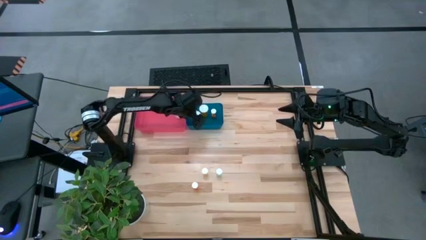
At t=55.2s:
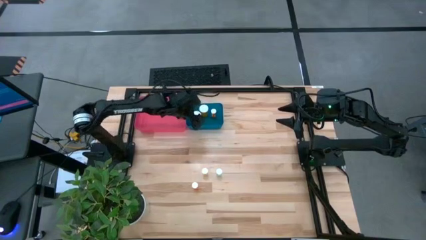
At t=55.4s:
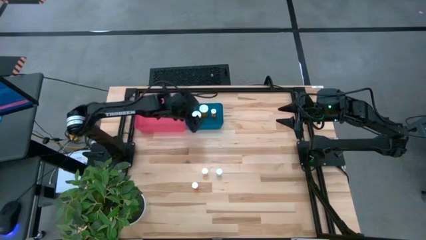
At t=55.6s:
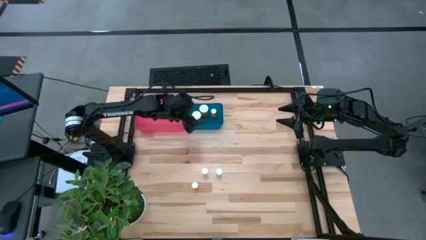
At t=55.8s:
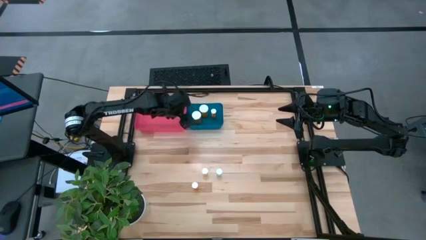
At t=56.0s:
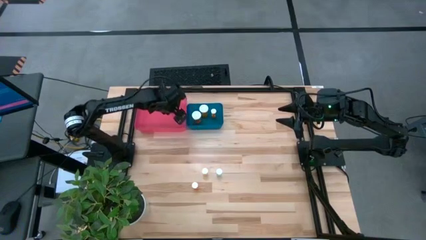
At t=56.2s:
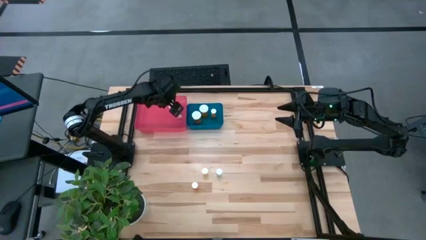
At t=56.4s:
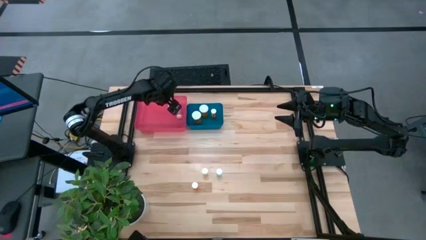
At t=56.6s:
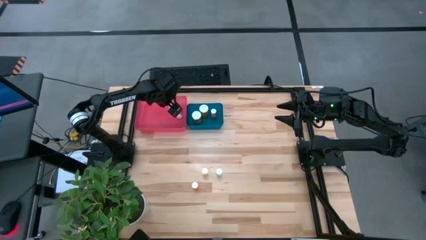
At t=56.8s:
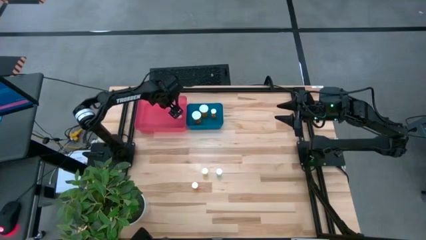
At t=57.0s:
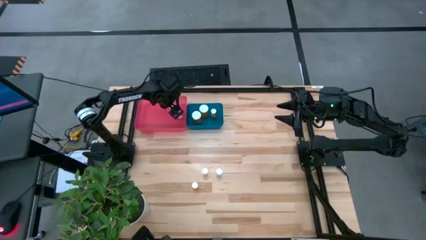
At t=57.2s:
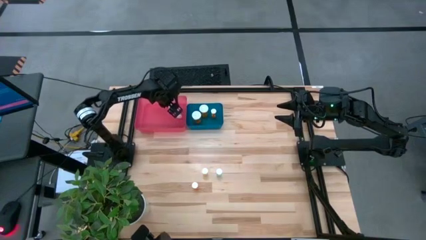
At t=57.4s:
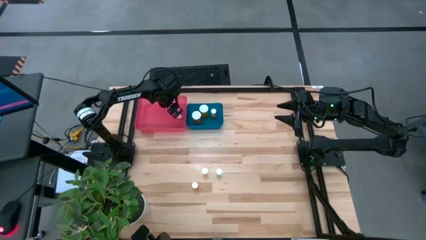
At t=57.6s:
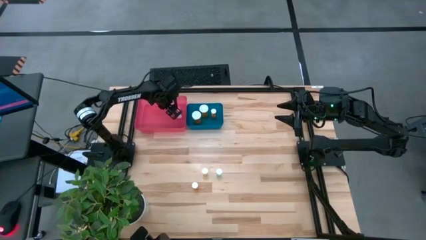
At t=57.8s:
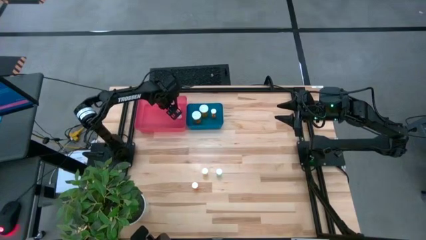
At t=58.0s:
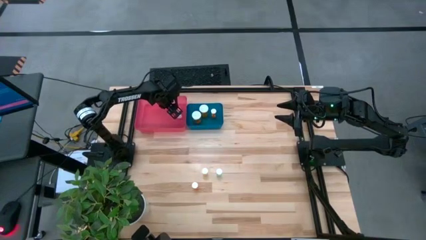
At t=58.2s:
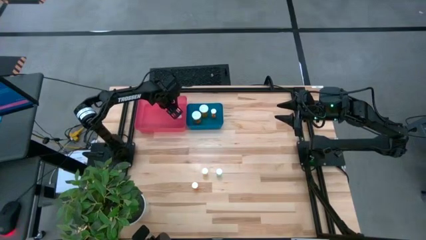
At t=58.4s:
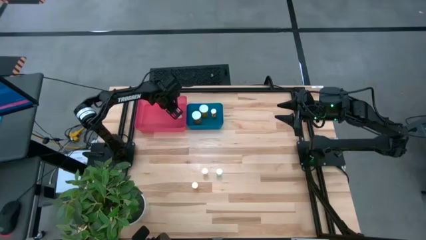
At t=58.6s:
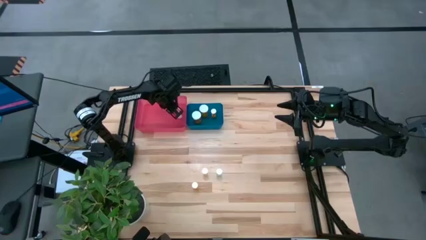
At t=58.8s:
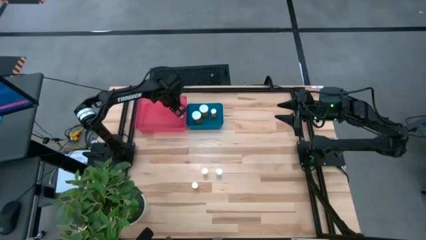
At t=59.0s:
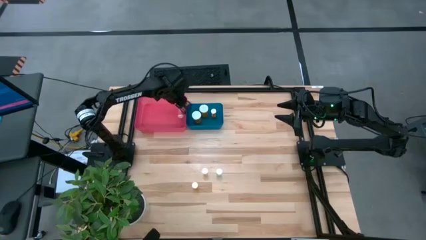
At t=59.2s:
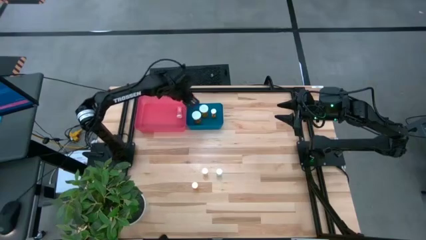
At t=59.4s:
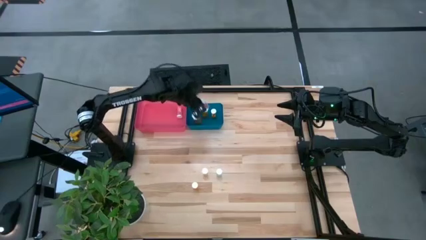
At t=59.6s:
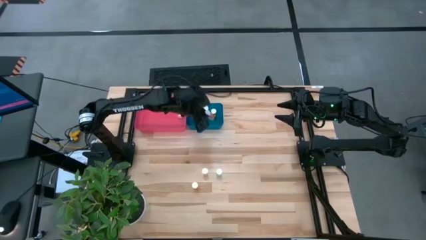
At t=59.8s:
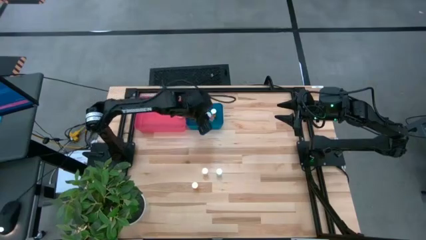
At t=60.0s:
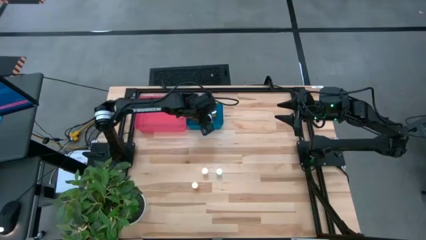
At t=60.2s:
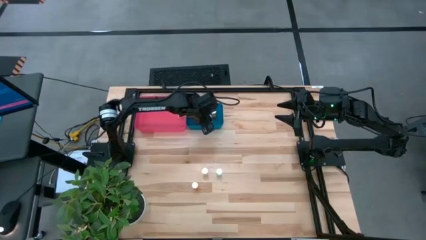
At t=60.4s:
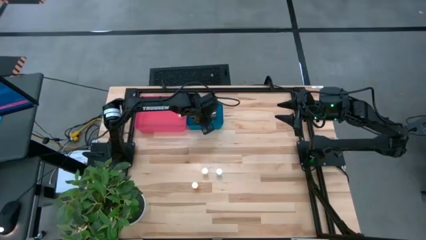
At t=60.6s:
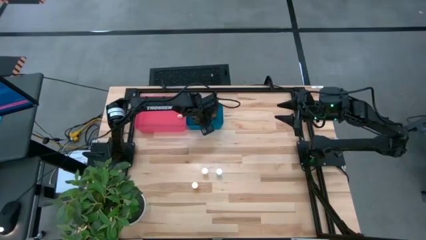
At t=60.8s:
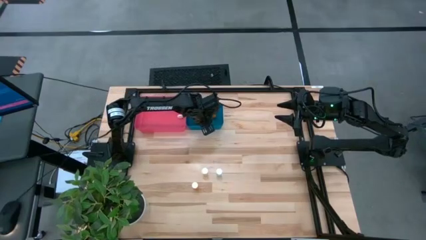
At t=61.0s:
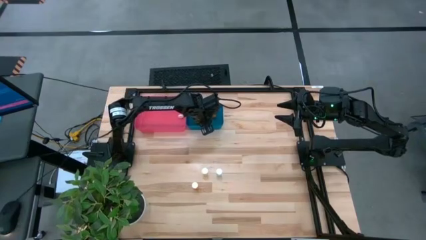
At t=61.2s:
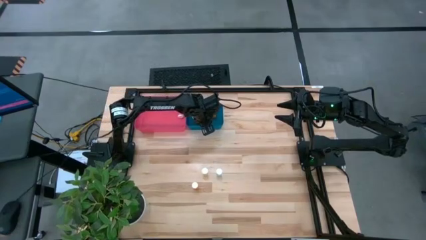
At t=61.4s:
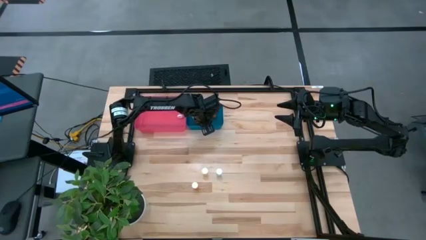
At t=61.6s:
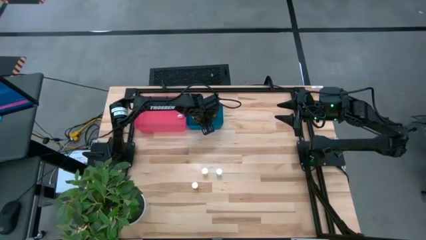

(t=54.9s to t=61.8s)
Task: Pick and place medicine bottles into bin by pill shape (circle, oval)
Put the blue capsule bottle from the pink bin into the blue bin

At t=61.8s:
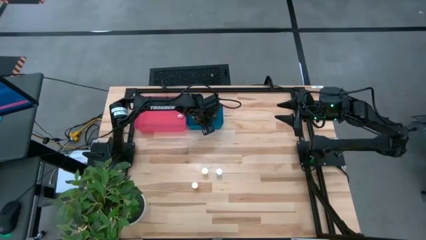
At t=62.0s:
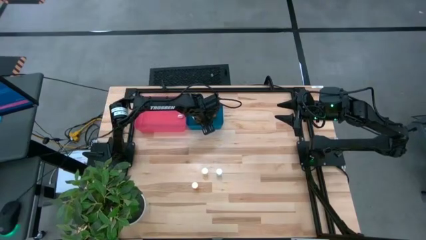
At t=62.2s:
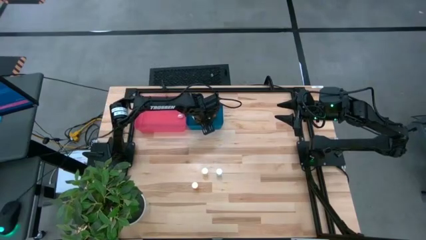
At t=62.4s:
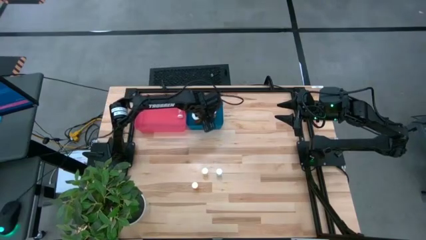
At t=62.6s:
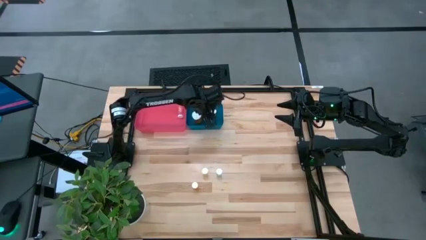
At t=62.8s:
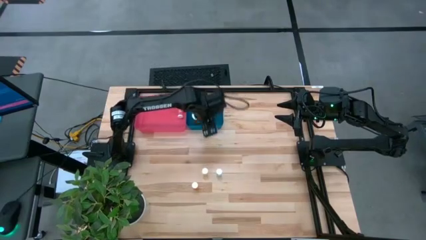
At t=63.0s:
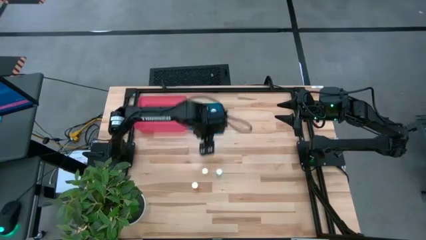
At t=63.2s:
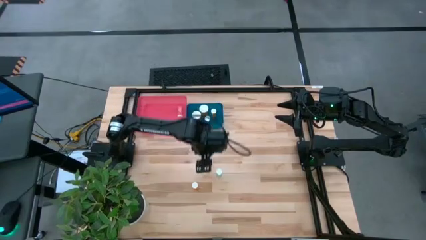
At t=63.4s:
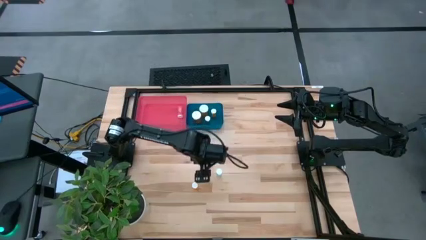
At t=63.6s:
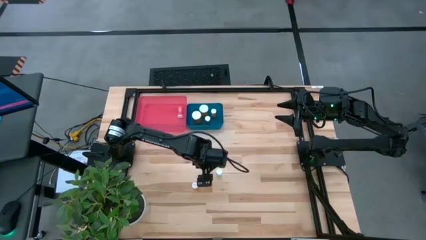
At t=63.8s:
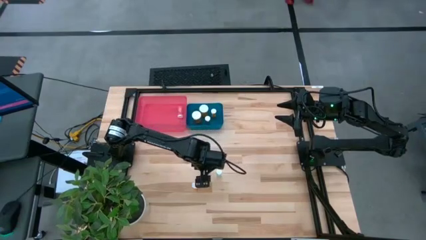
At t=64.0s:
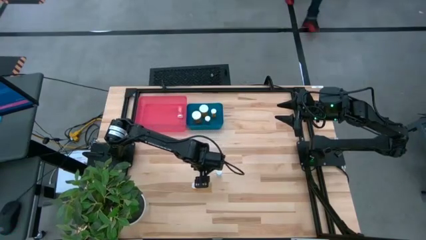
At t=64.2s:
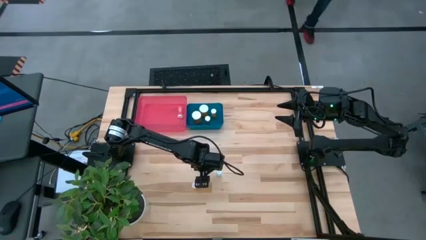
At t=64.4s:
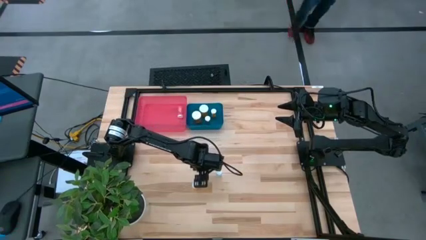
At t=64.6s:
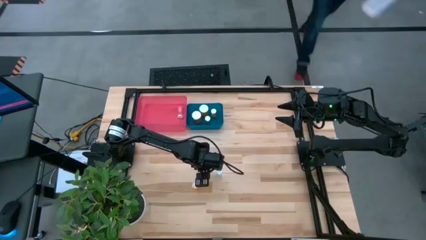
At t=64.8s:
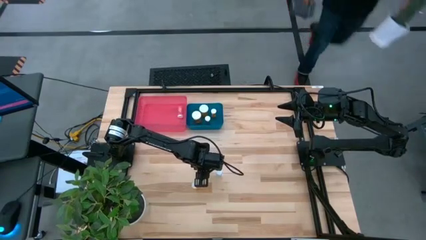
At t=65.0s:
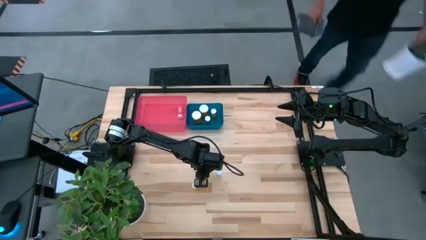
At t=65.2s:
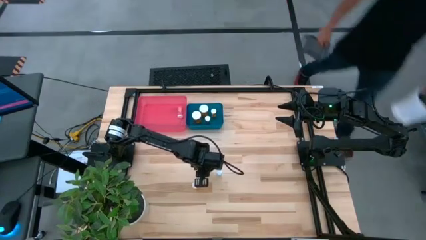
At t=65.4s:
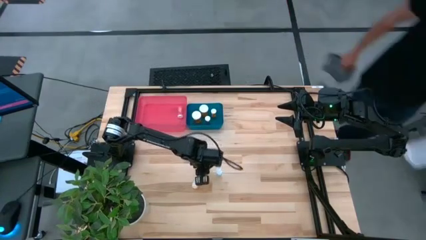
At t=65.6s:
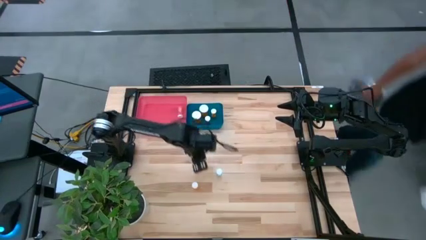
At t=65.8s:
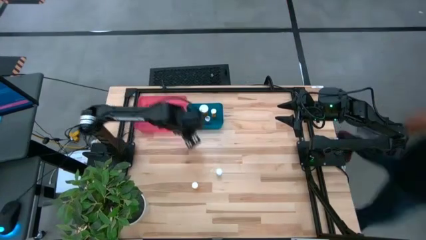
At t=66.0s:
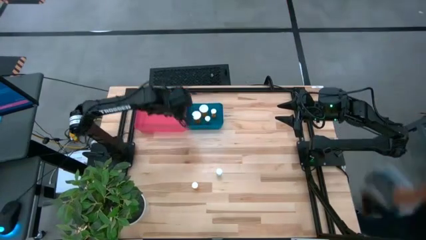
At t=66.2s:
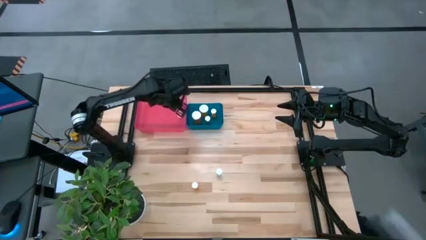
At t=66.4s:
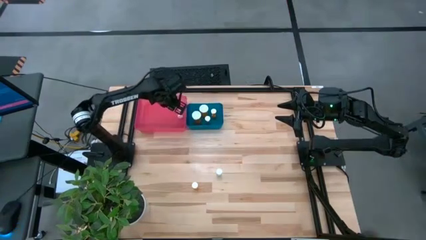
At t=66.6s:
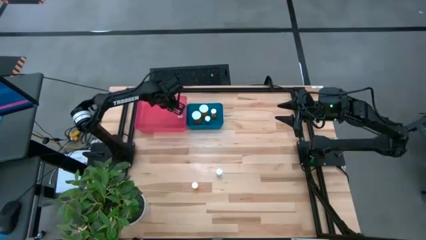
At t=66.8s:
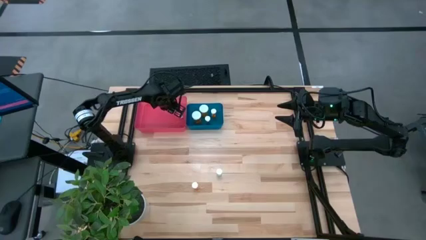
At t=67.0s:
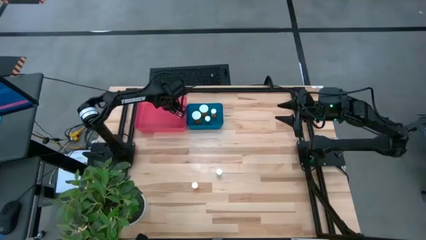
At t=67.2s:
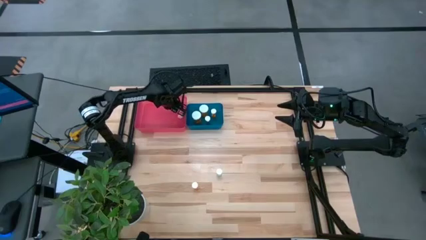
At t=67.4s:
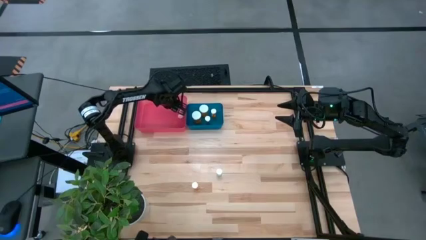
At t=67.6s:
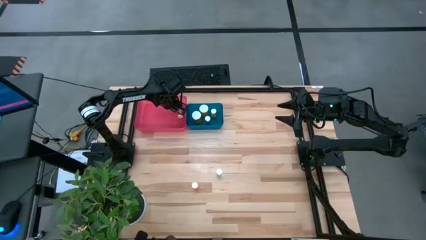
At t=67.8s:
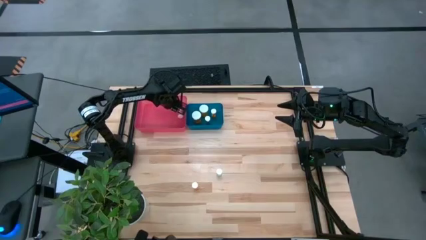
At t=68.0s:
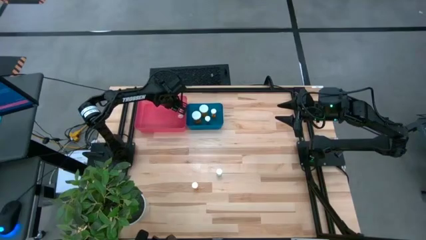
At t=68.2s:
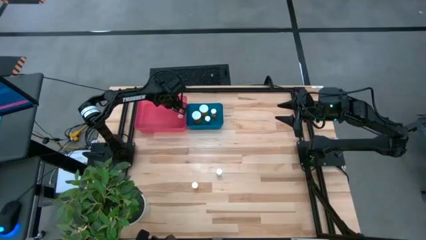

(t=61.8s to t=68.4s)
Put the yellow tablet bottle into the pink bin

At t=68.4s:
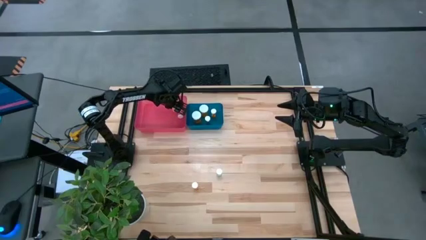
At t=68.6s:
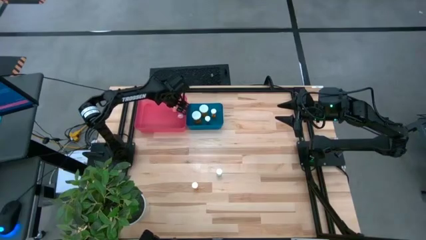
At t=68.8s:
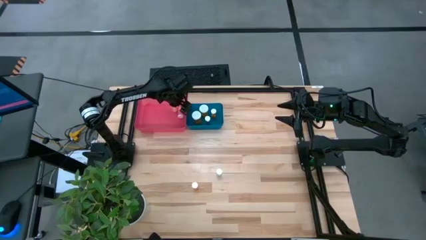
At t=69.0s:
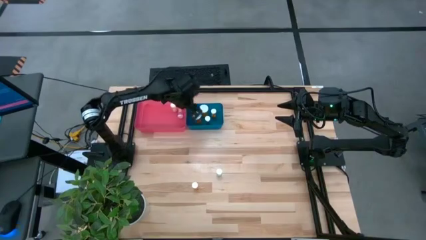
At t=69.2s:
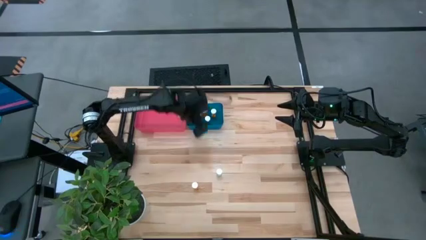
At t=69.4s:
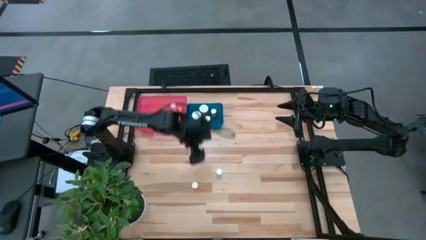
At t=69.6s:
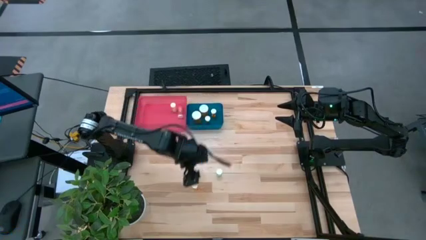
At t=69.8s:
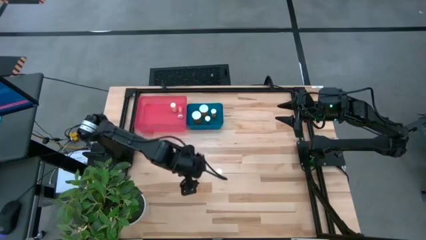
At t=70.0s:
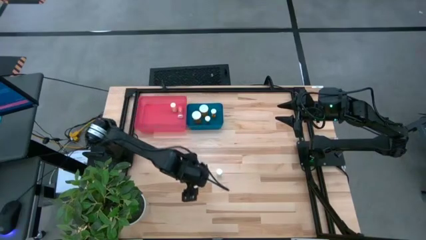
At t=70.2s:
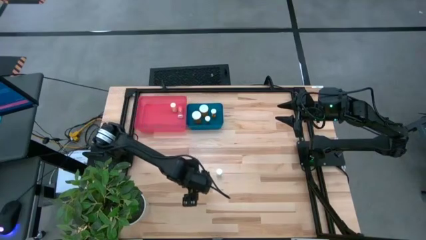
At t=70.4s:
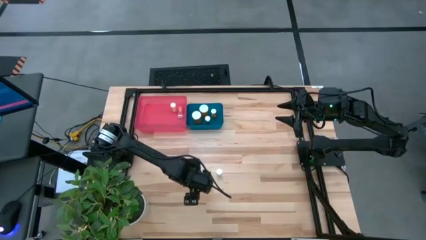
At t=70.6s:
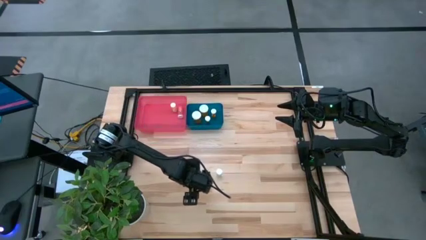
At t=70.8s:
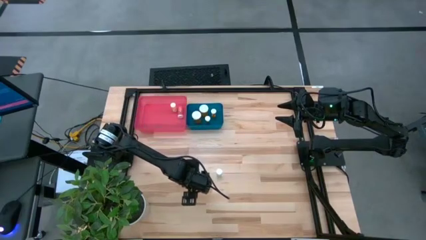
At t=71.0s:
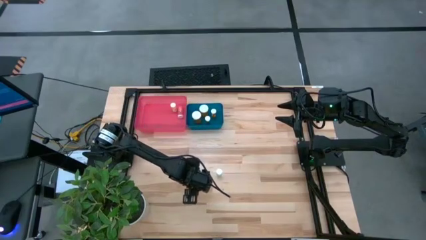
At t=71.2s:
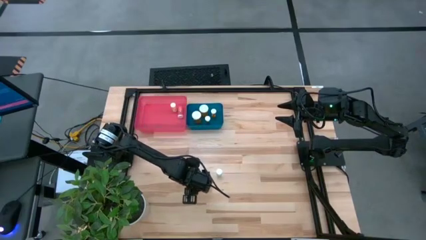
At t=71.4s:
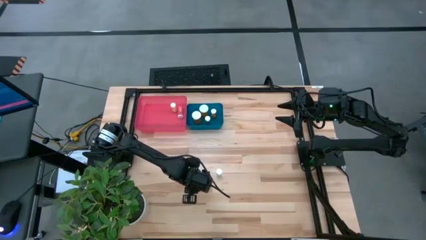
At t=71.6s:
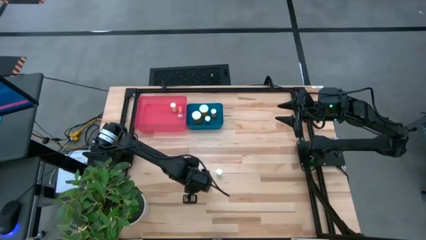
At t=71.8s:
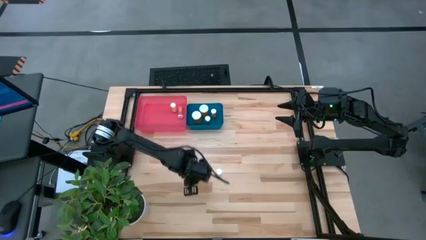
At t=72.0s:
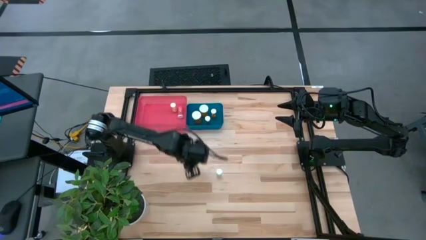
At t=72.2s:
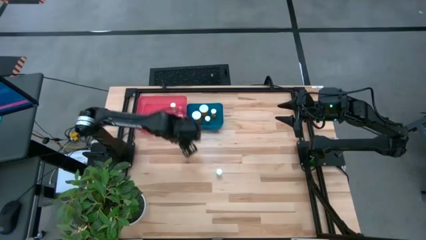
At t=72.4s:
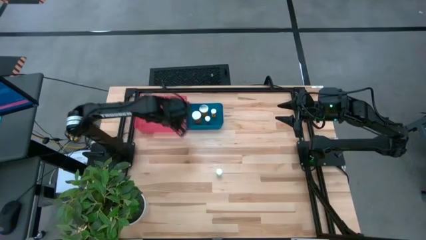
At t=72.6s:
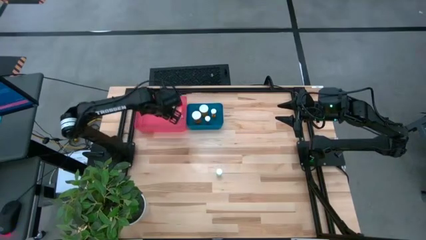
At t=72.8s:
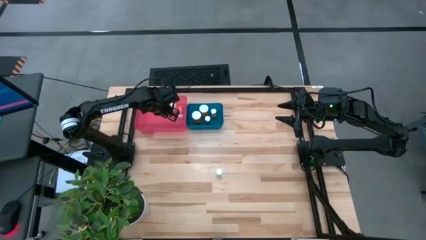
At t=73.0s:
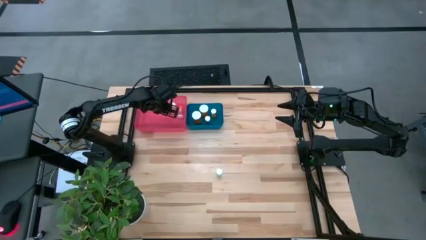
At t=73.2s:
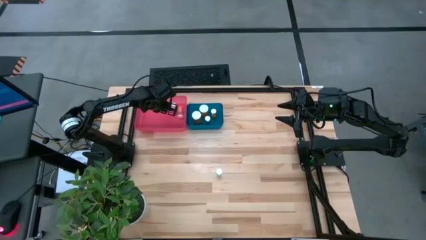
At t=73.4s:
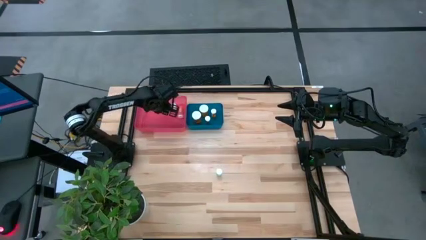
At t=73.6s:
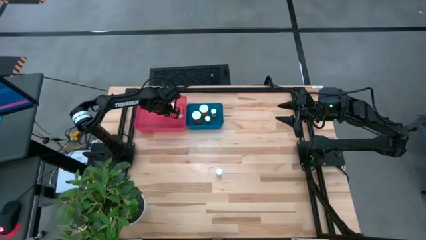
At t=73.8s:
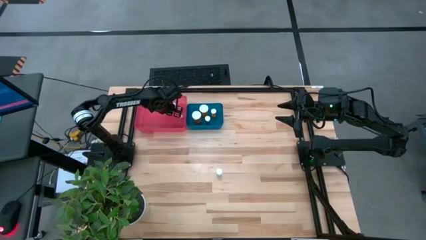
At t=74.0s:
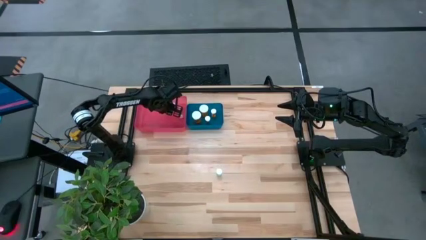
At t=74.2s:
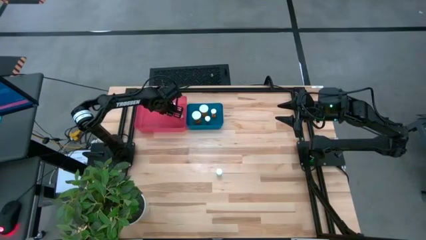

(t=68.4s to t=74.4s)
Put the orange tablet bottle into the pink bin
